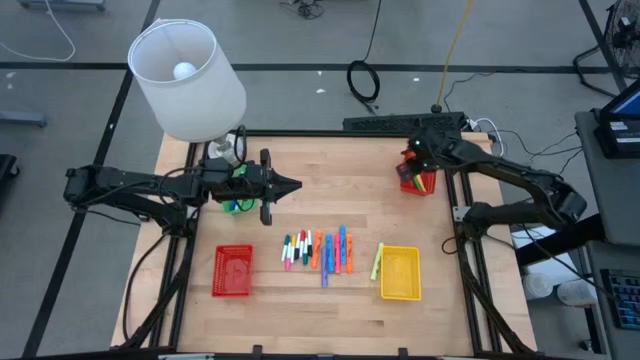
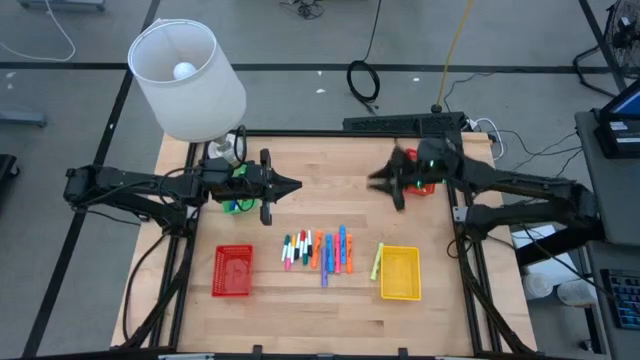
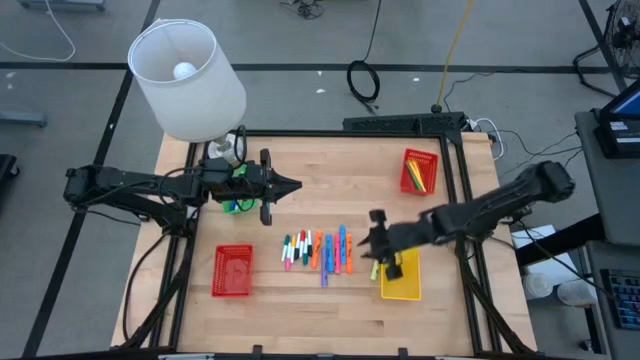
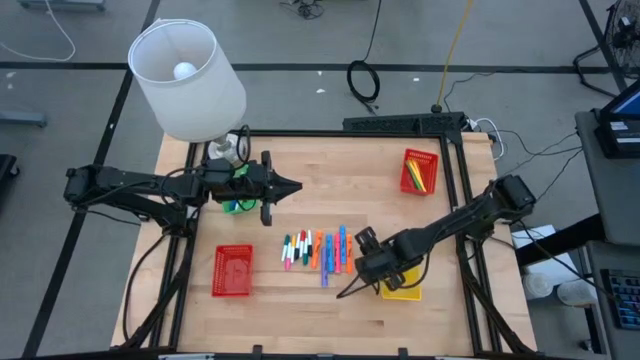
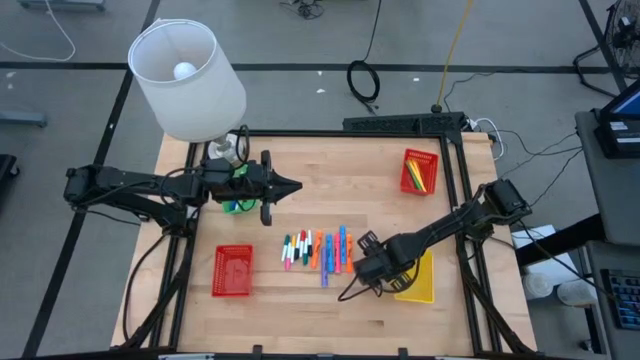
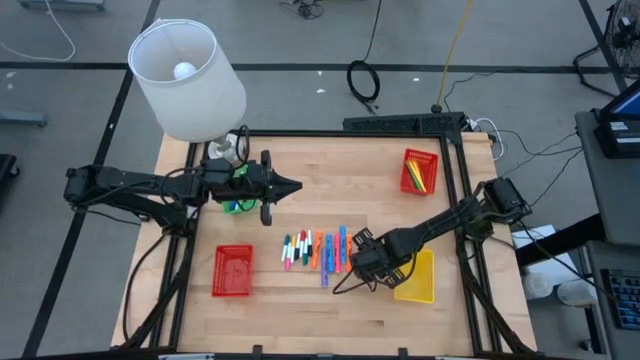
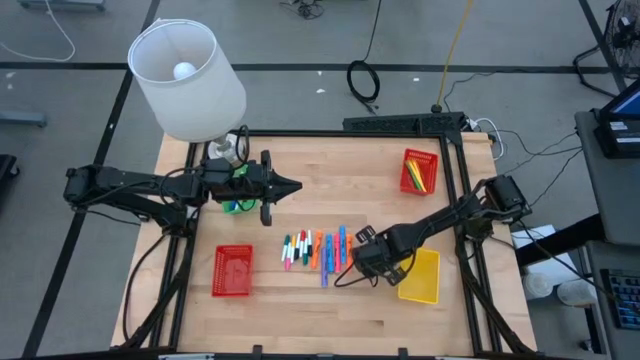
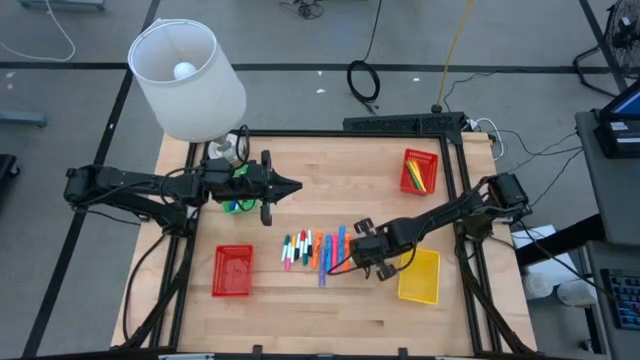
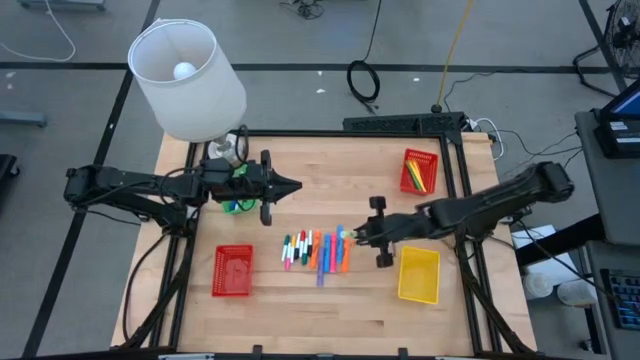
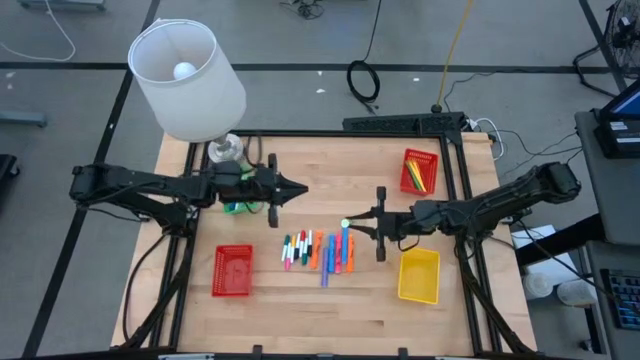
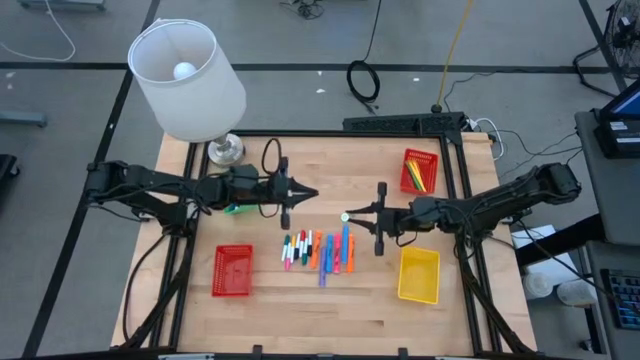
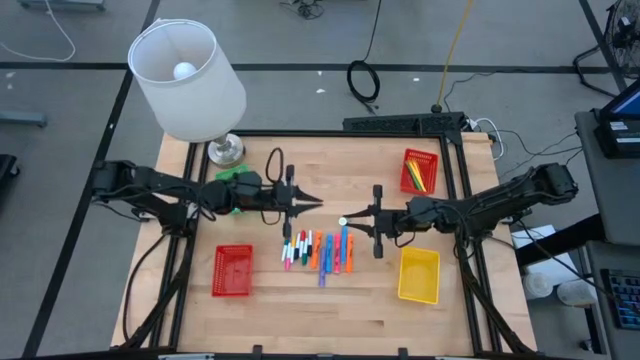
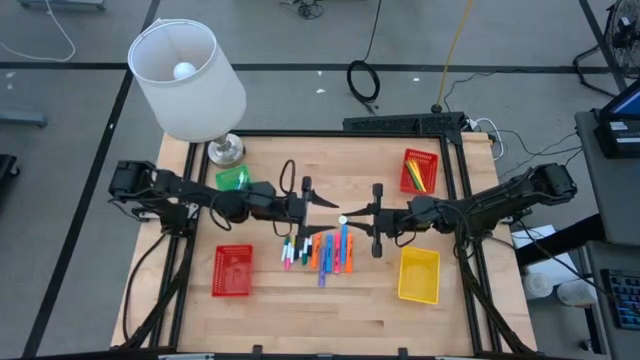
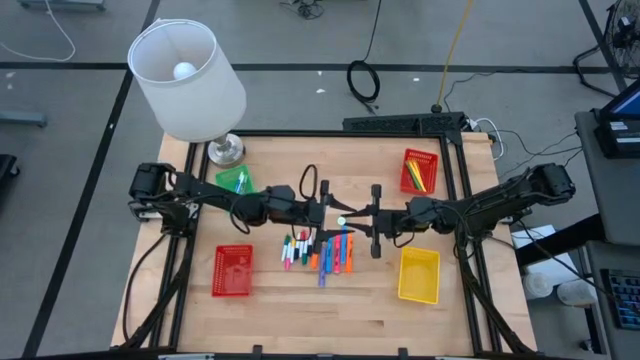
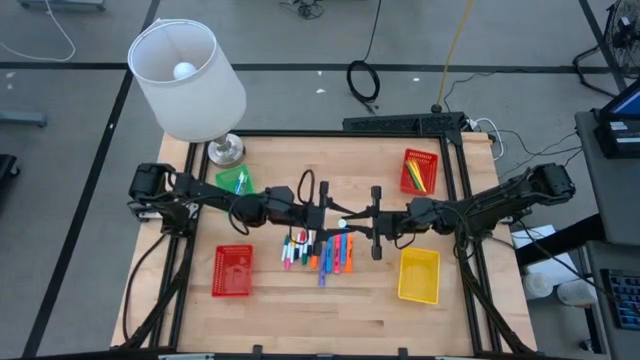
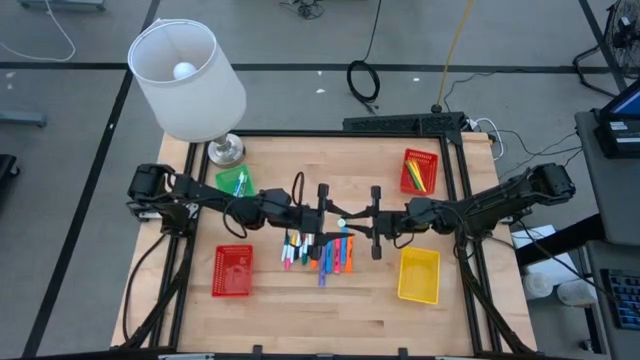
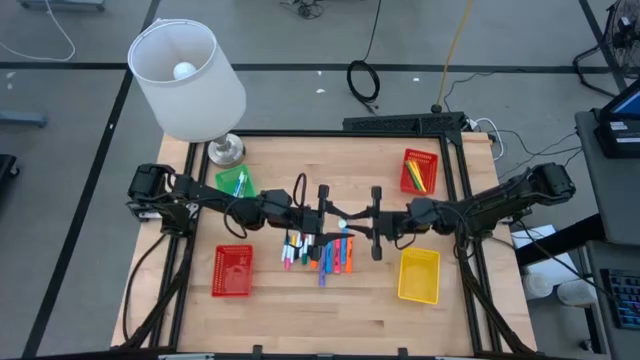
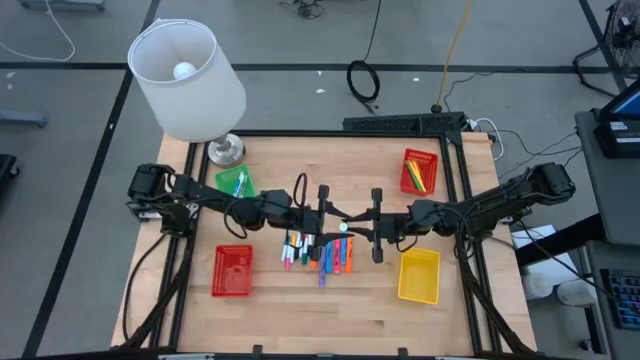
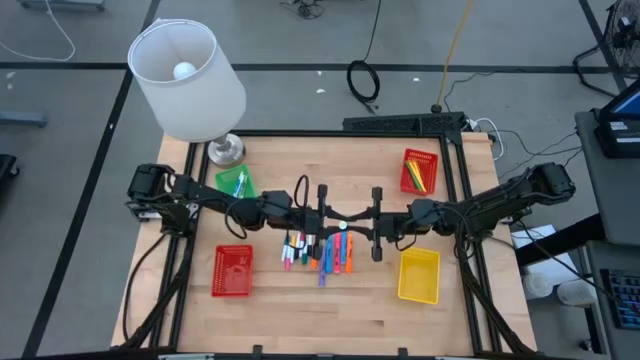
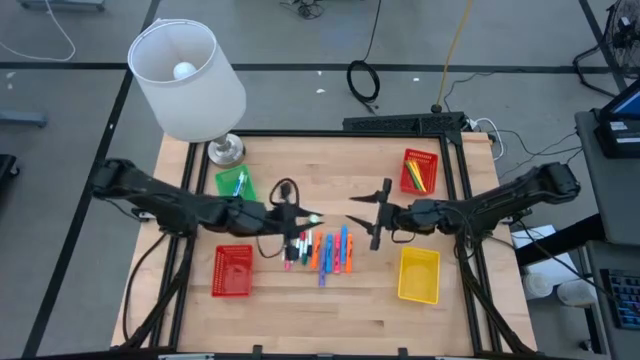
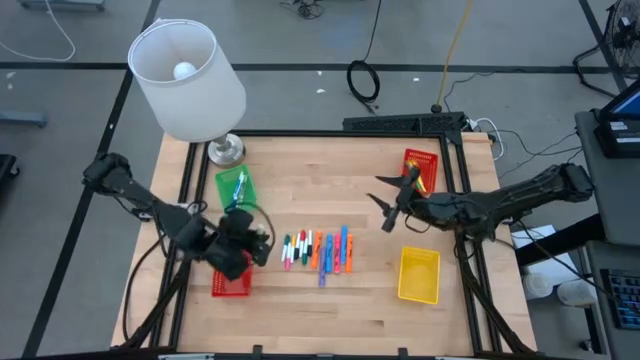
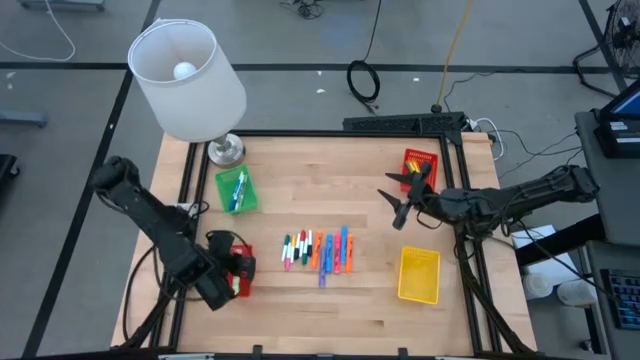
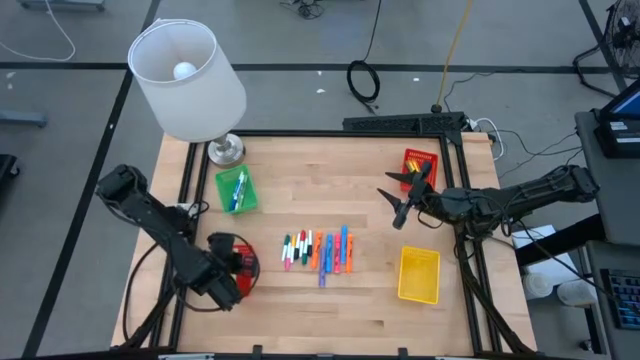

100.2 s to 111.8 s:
Task: Pick & Place Markers
Put the green highlighter pen into the bottom red basket

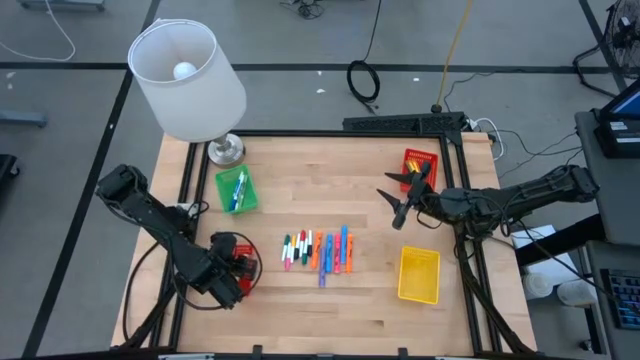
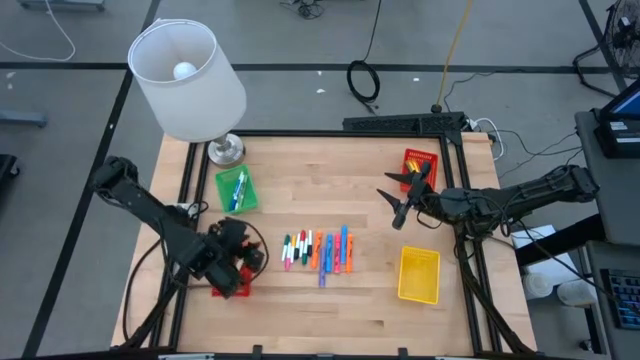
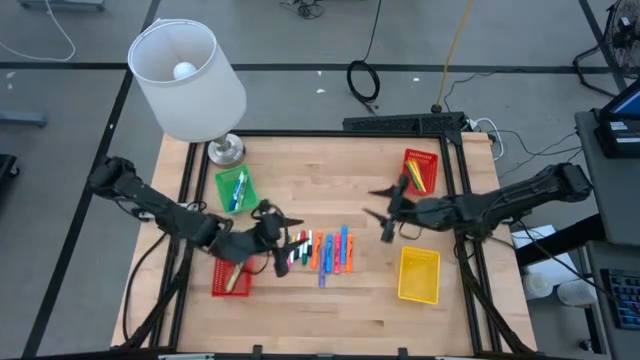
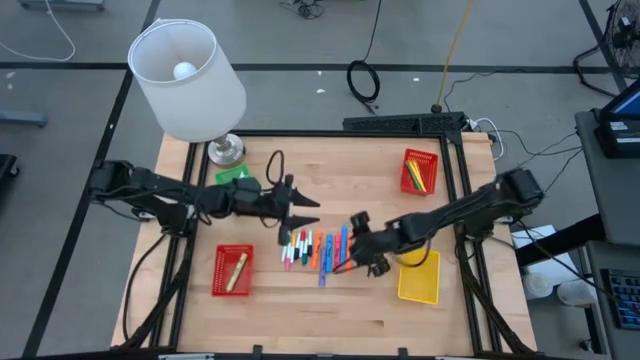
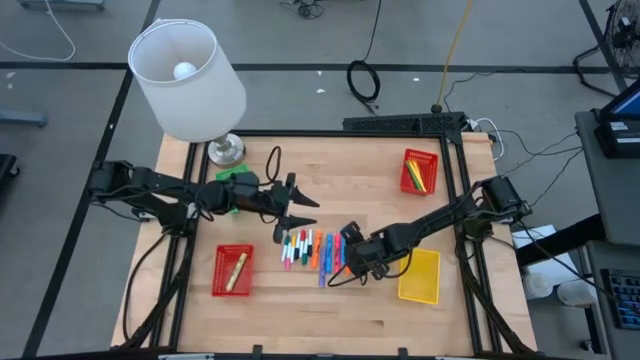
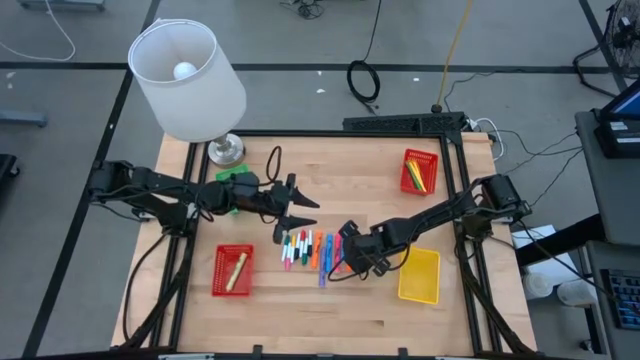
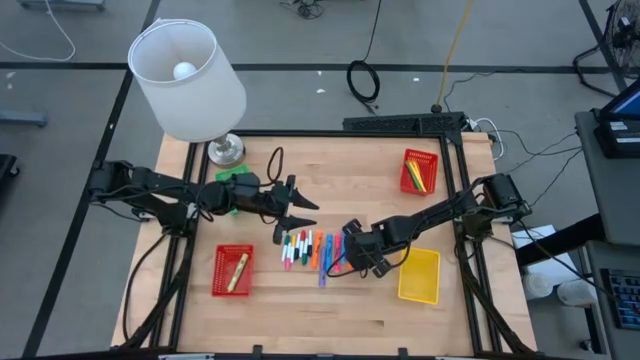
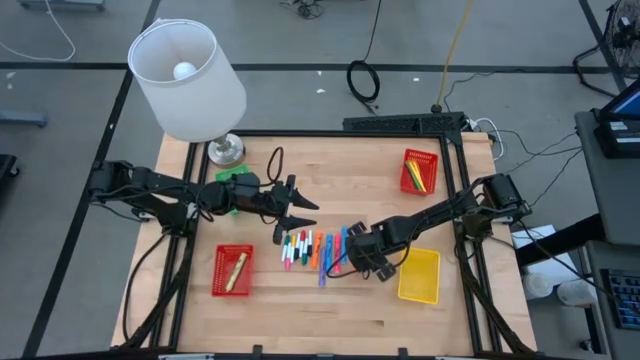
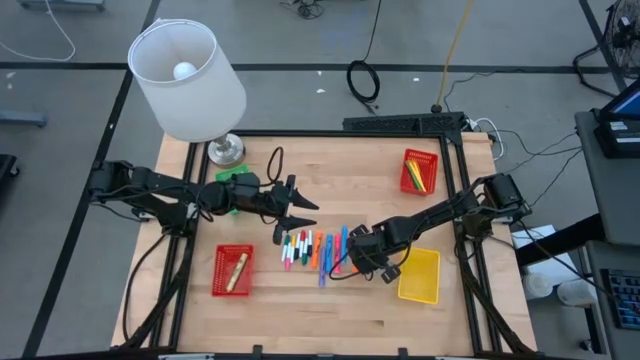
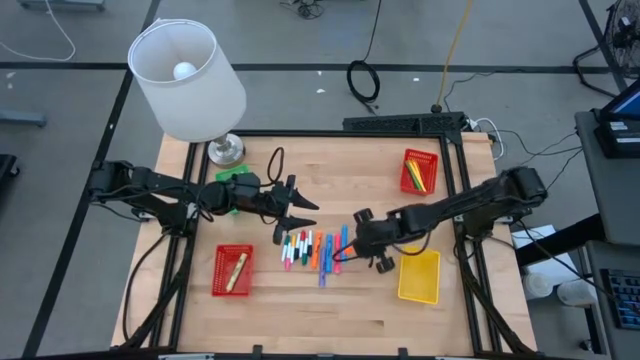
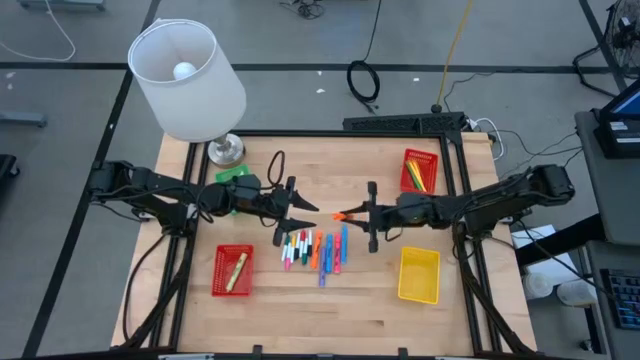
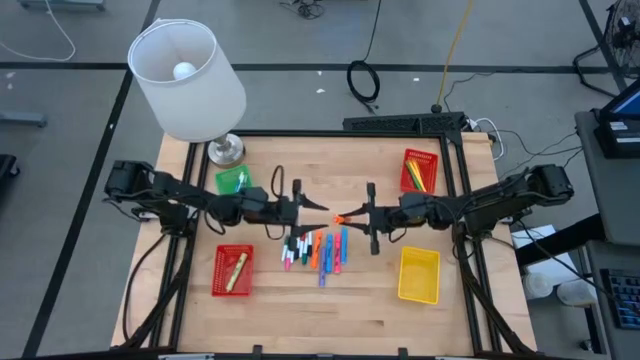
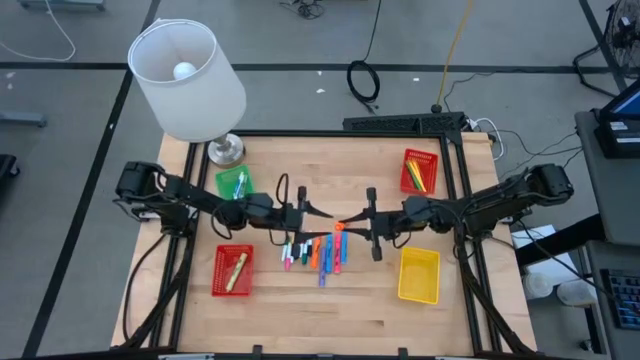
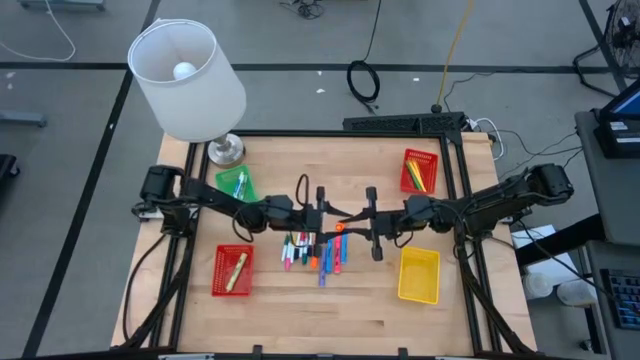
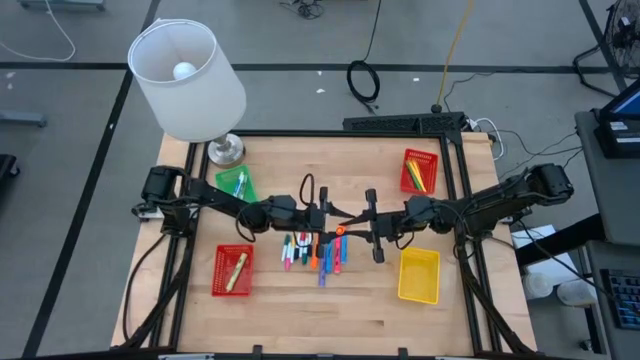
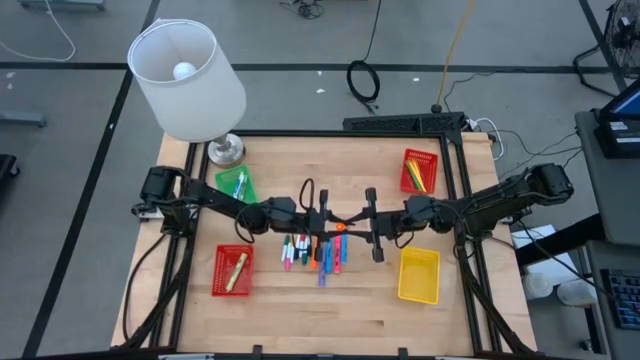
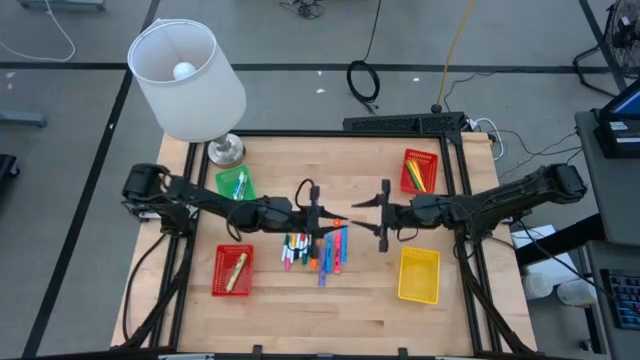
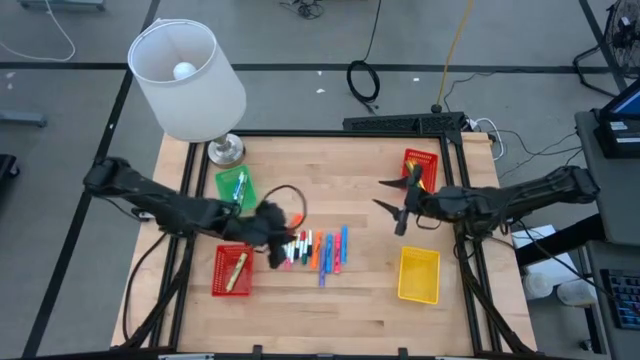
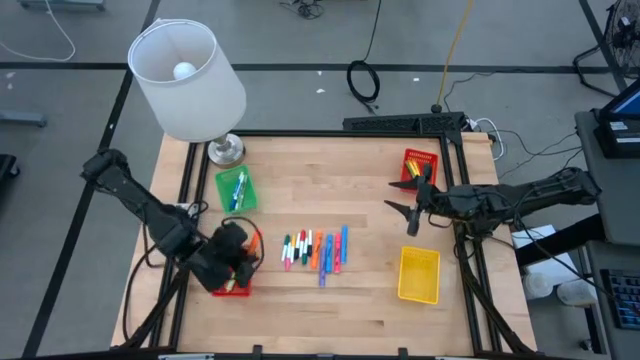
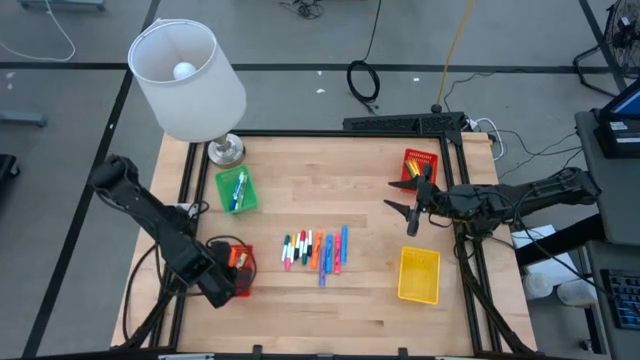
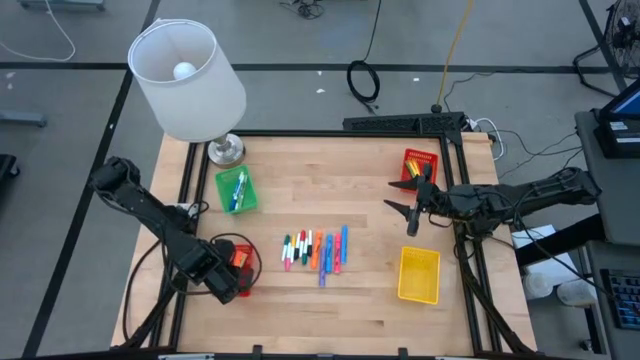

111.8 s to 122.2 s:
Put the orange highlighter pen into the bottom red basket
